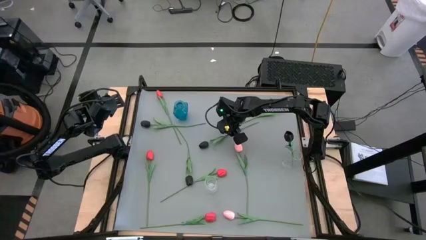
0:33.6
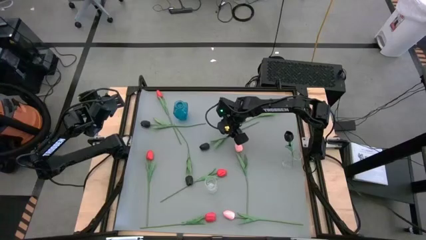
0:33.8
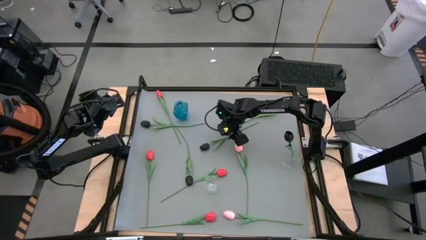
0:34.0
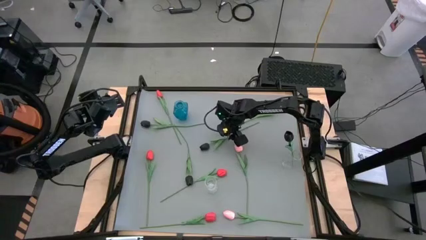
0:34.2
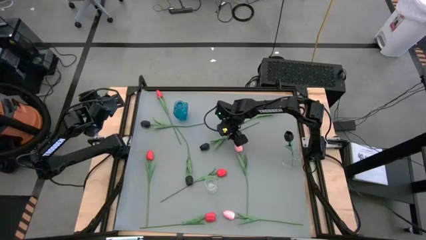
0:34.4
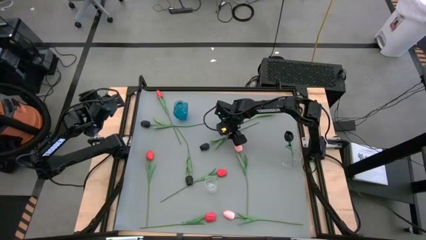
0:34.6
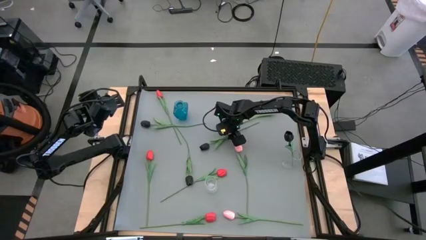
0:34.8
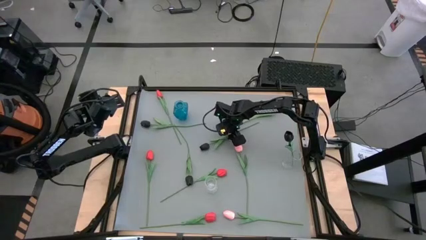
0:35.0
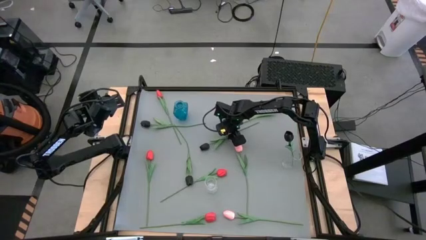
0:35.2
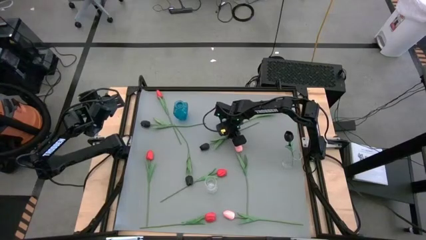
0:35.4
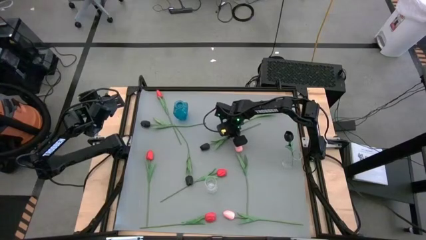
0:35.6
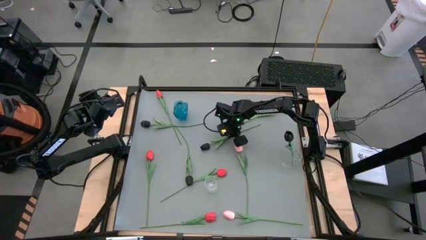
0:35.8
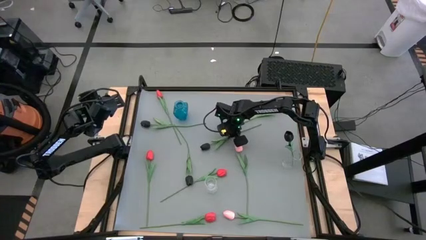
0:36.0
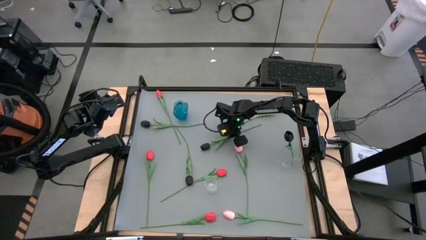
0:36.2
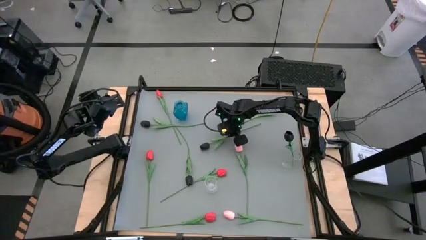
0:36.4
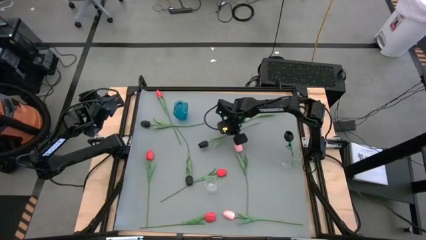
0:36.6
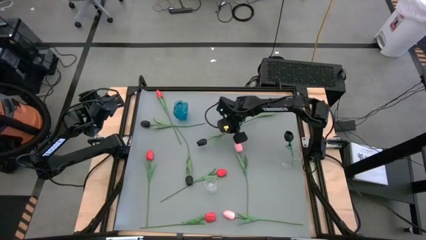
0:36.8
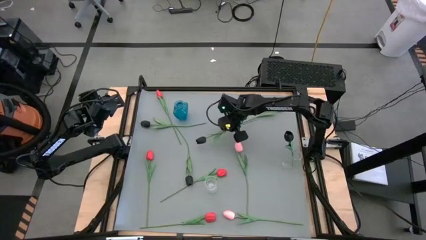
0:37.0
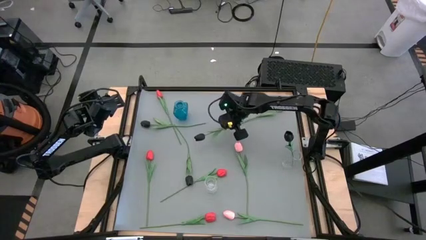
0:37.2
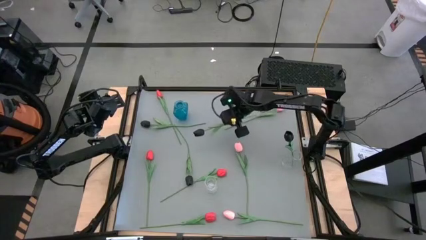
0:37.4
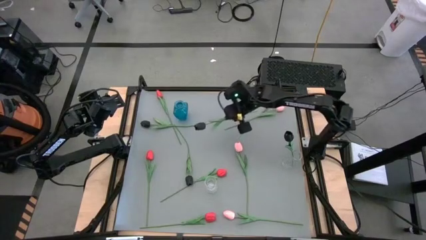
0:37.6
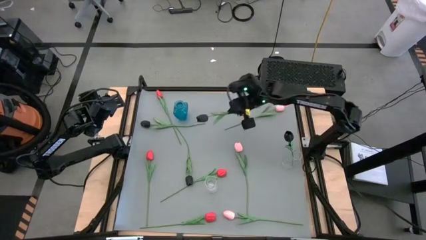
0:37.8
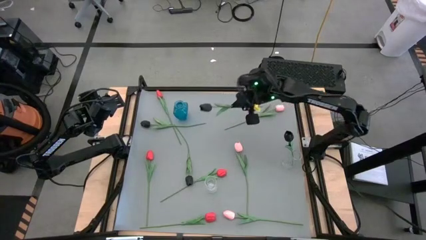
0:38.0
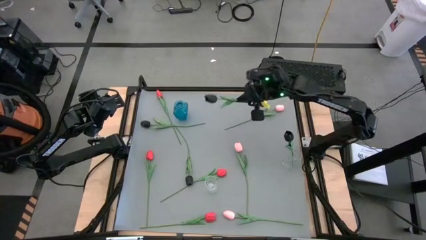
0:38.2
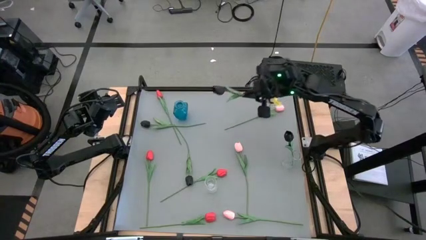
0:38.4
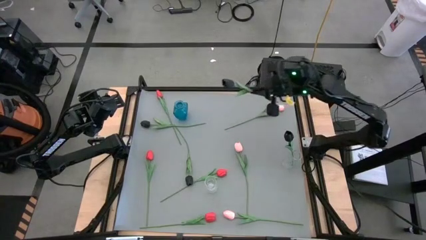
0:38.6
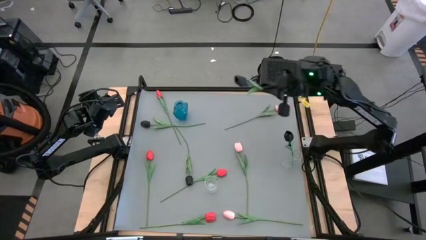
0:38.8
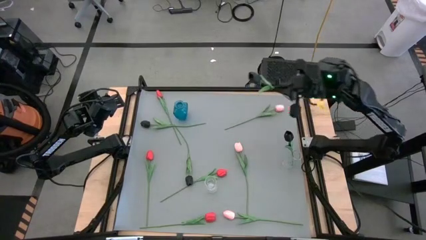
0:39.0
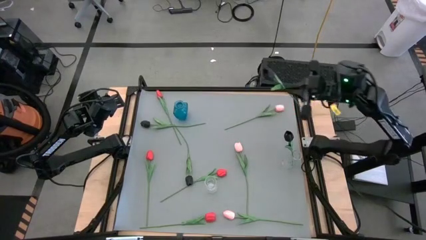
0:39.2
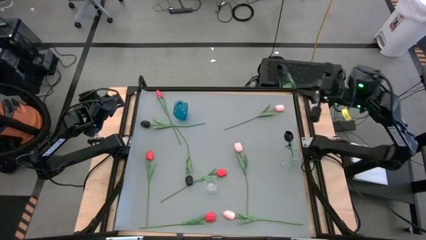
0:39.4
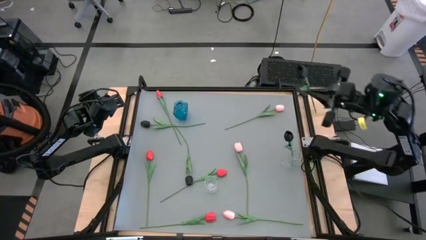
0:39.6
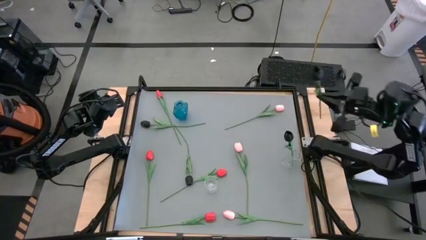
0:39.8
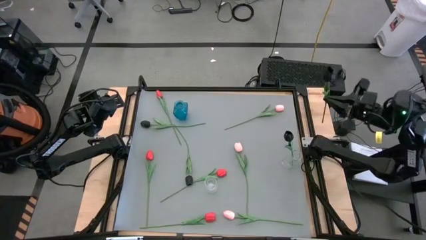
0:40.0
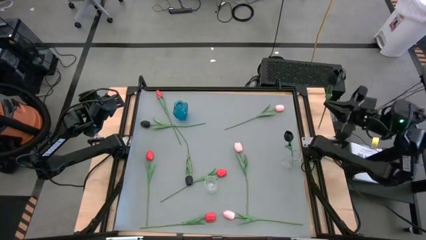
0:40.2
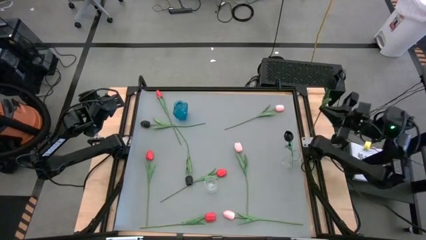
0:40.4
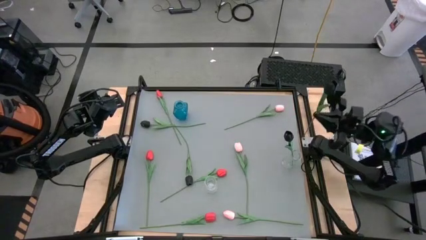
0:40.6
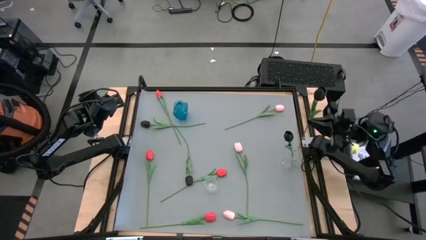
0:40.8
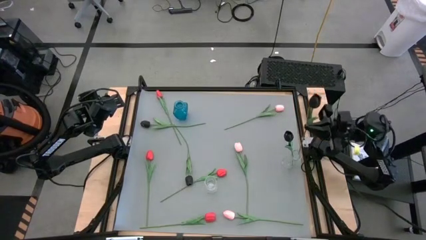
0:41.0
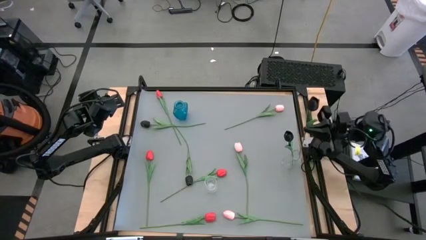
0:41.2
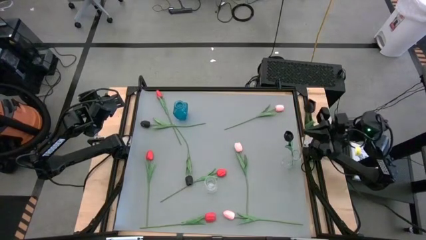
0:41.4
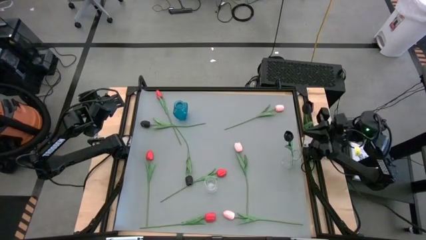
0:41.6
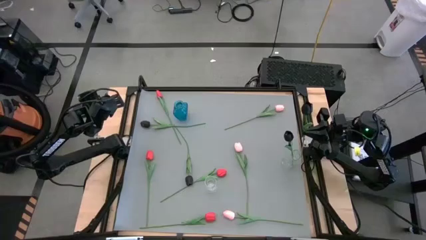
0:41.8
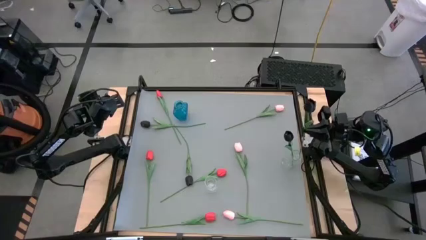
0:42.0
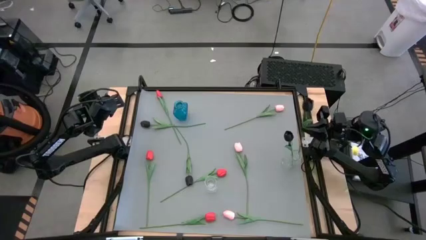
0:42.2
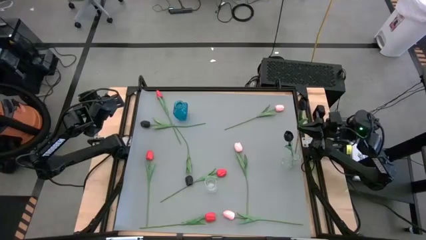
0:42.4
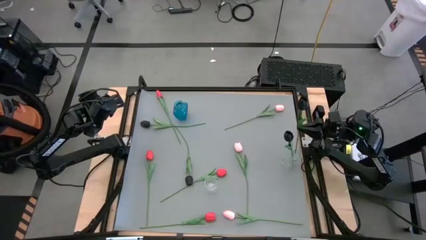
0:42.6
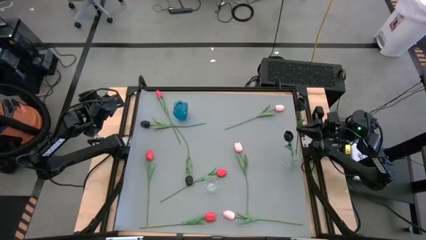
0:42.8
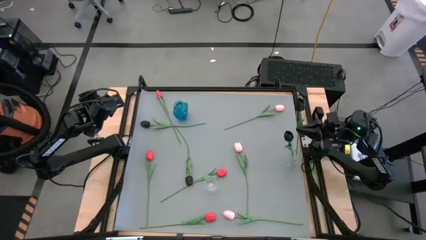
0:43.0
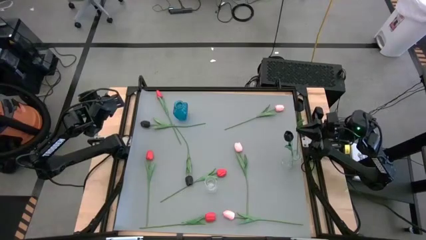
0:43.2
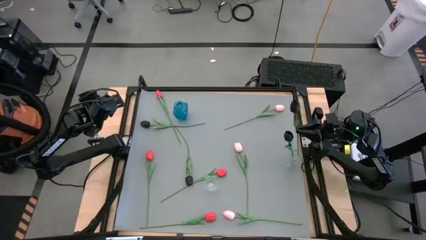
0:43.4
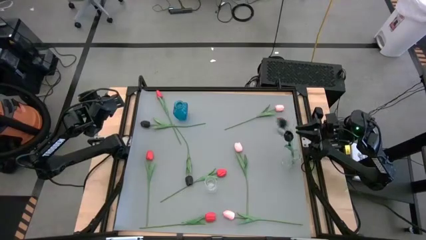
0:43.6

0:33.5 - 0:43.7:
Task: Sort flowers into vase by color
Put the black flower into the right transparent vase

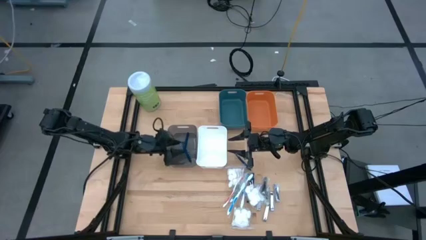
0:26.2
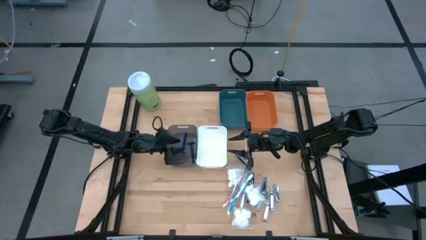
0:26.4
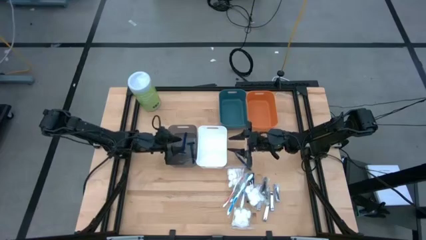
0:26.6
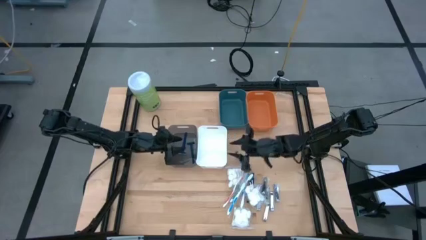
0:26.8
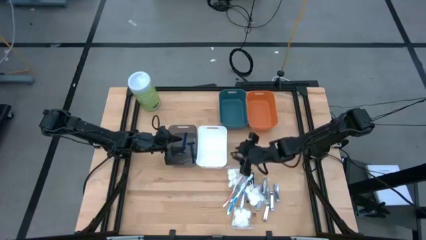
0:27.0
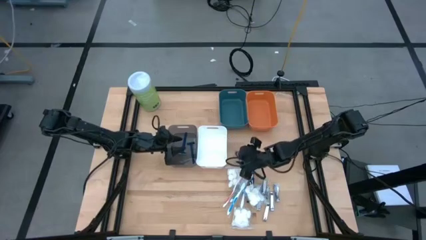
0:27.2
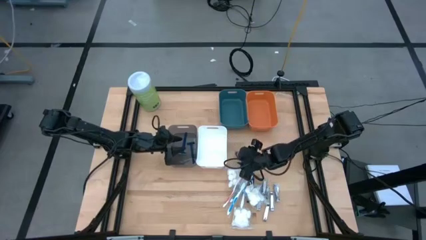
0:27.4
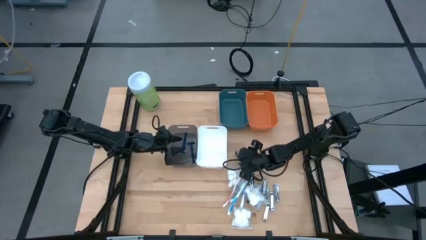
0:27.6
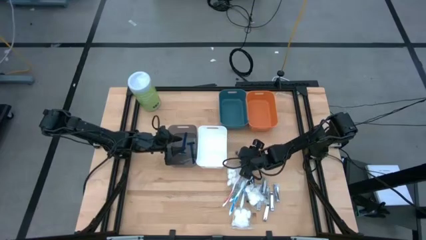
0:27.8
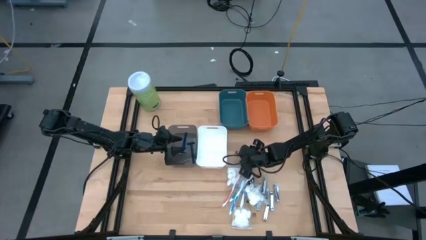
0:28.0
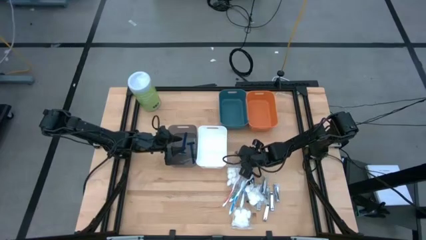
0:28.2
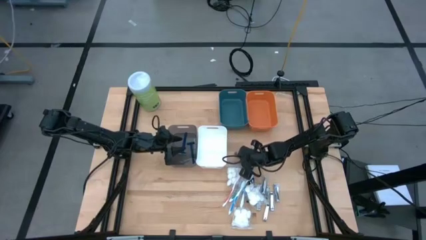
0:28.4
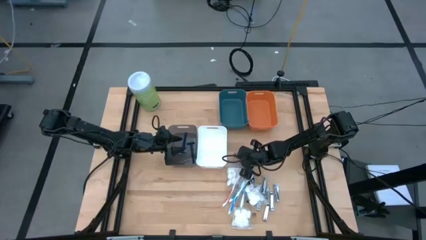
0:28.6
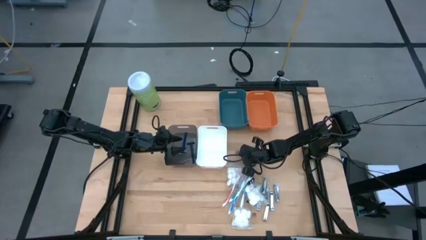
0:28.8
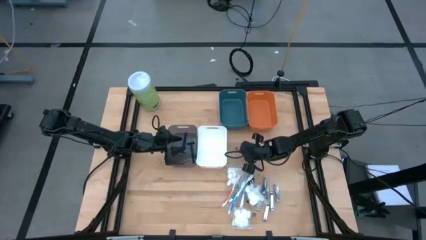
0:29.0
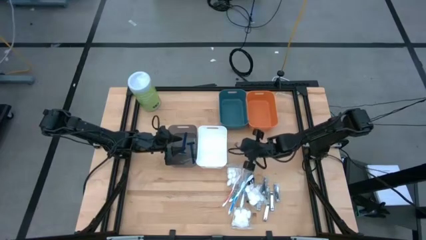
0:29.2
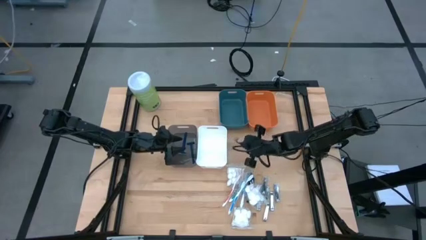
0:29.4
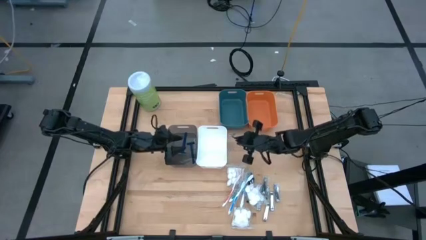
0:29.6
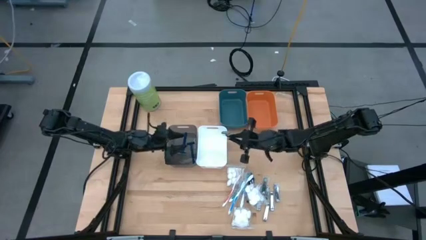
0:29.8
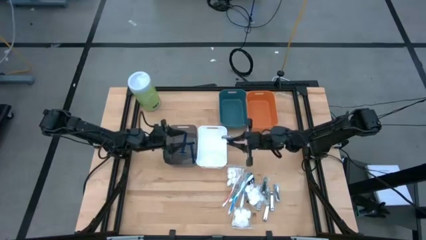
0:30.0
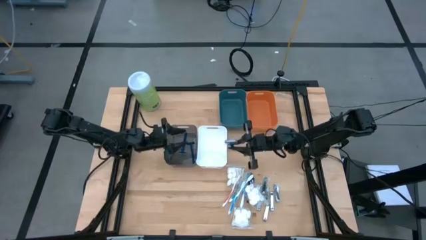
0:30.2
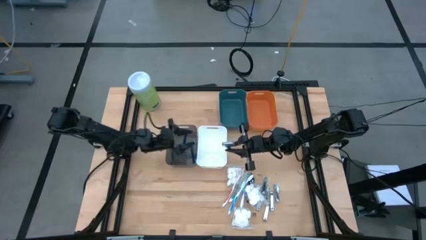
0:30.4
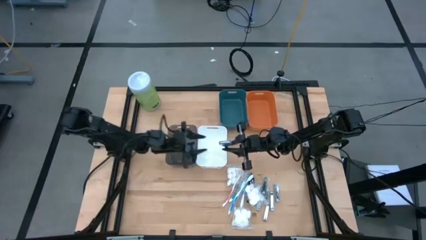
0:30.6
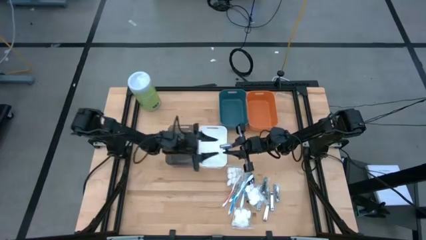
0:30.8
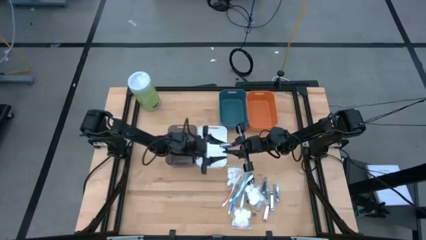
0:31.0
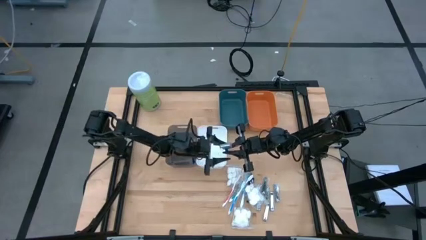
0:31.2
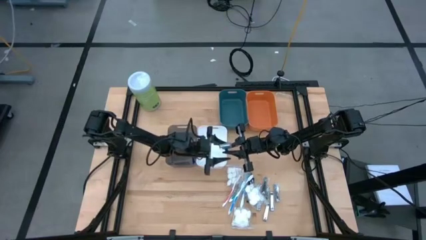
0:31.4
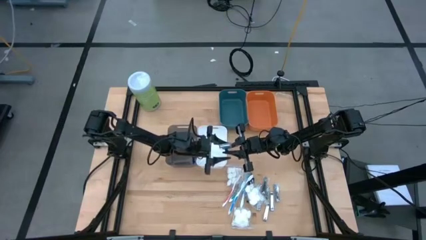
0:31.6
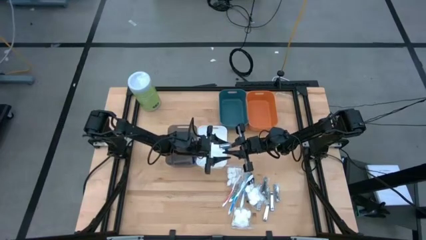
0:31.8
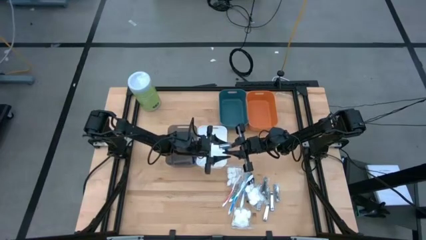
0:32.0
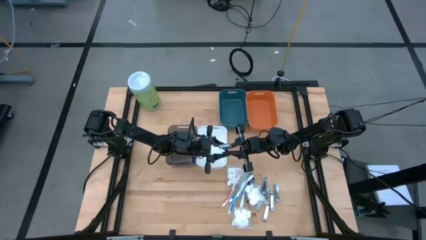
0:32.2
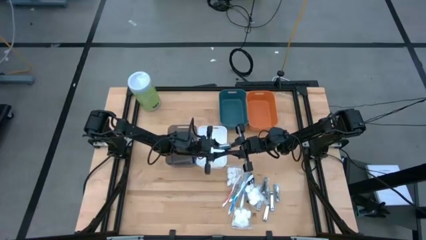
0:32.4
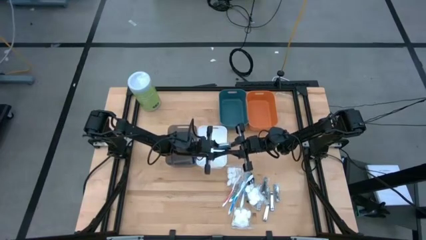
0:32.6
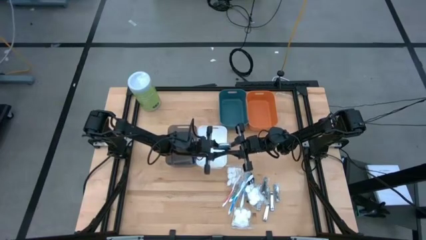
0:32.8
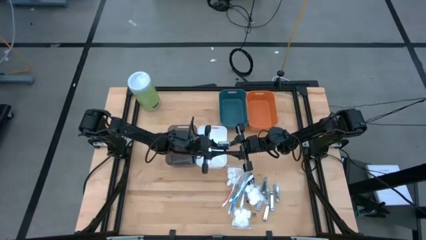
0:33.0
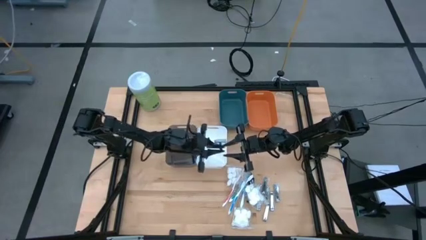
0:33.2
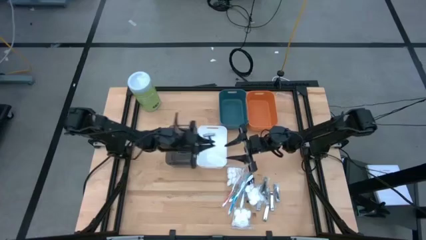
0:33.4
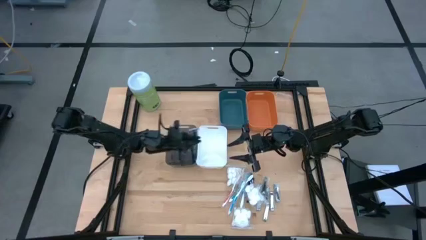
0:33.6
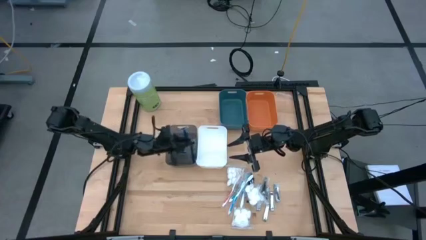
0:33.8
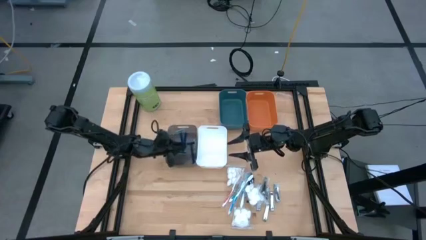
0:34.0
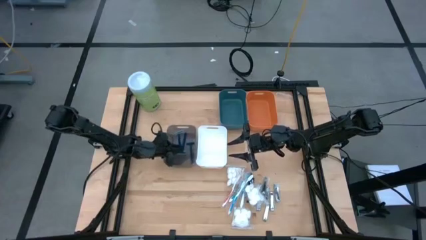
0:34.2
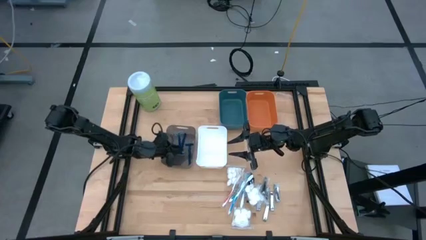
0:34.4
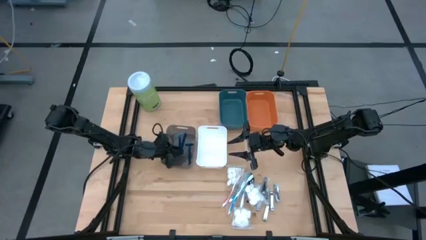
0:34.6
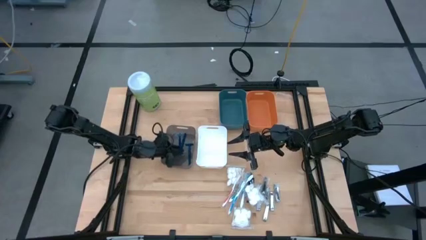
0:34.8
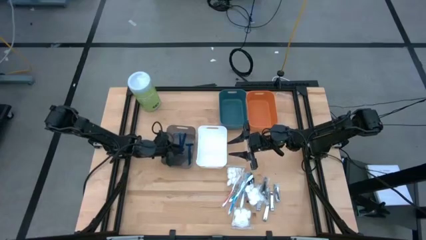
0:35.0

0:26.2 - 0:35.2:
Task: Pick & Place Travel size toiletries
Put the blue razor into the black bin
